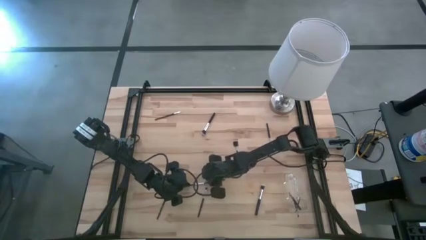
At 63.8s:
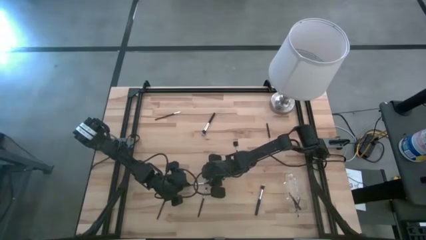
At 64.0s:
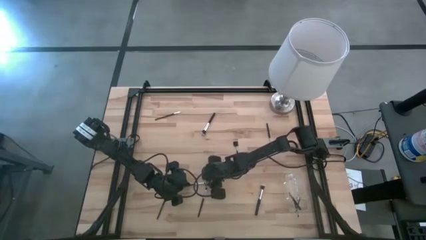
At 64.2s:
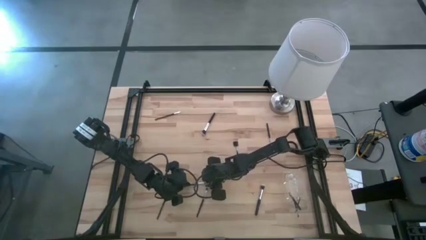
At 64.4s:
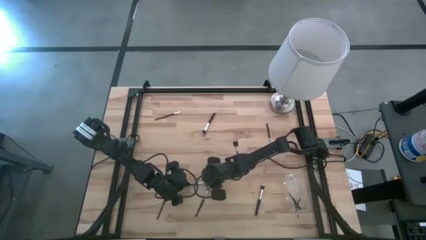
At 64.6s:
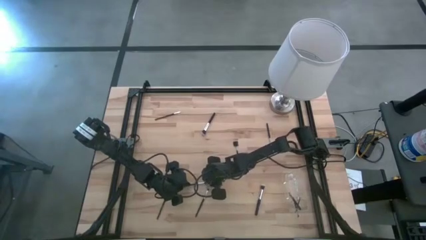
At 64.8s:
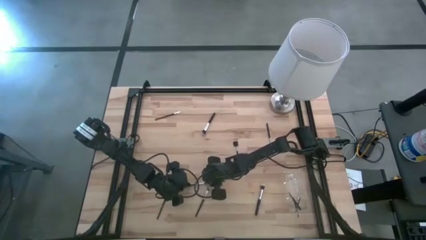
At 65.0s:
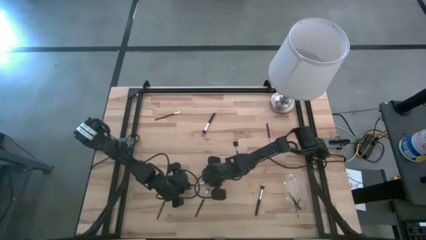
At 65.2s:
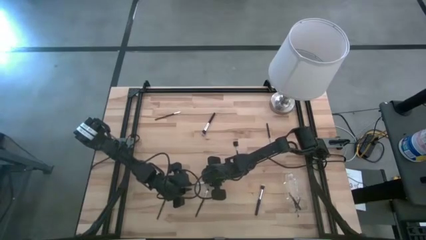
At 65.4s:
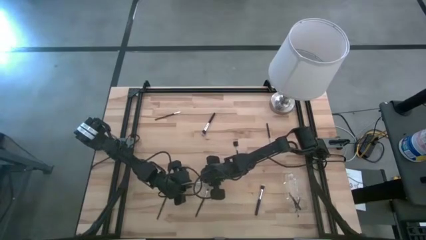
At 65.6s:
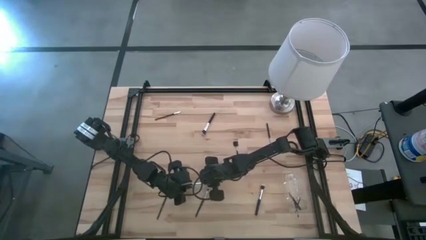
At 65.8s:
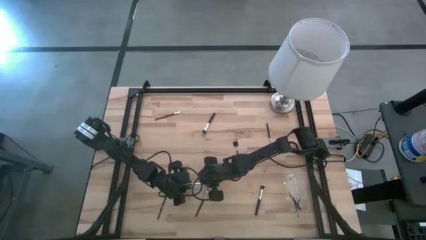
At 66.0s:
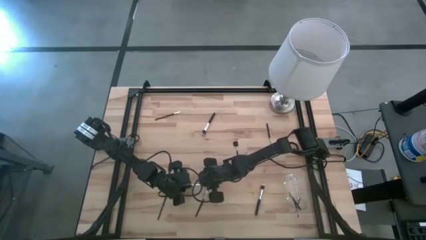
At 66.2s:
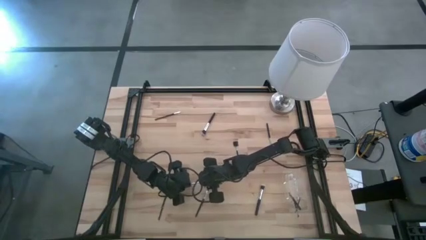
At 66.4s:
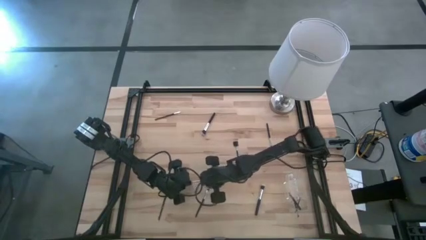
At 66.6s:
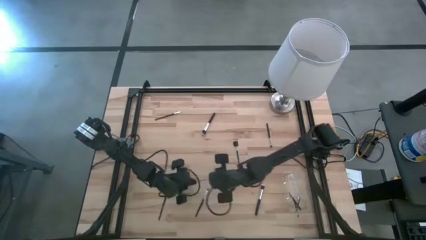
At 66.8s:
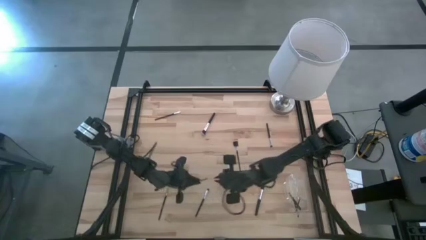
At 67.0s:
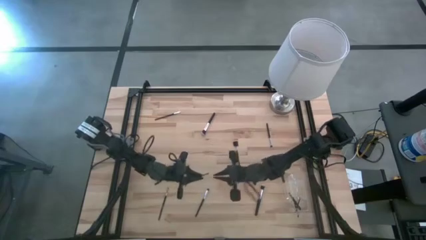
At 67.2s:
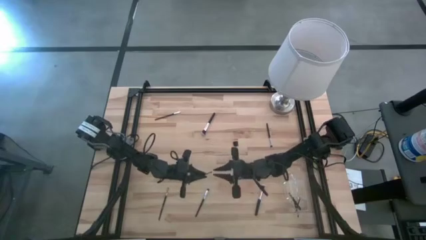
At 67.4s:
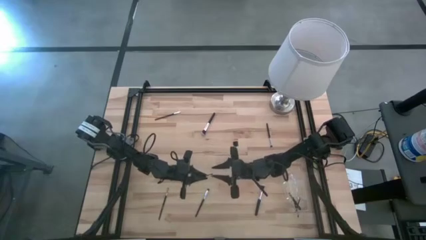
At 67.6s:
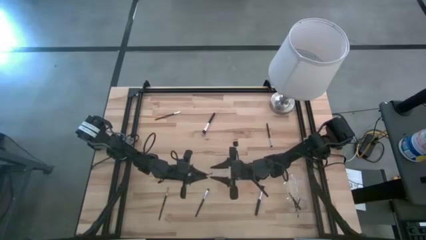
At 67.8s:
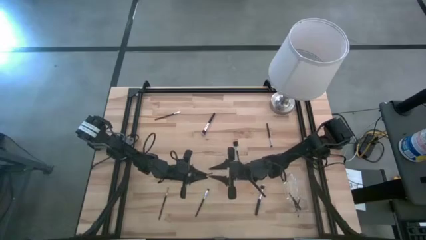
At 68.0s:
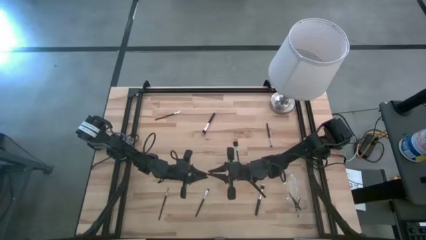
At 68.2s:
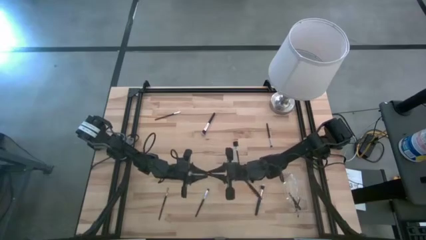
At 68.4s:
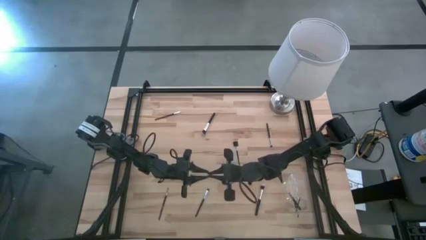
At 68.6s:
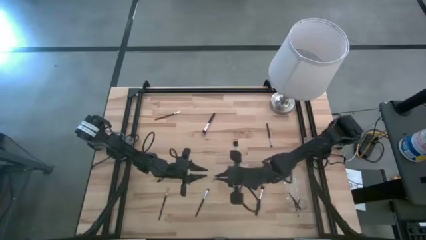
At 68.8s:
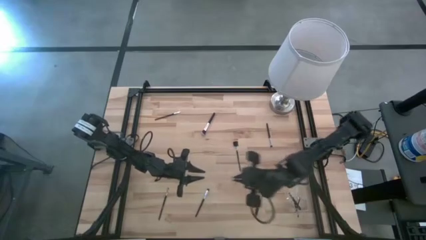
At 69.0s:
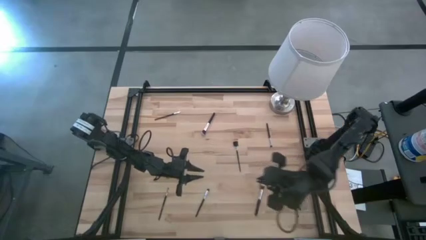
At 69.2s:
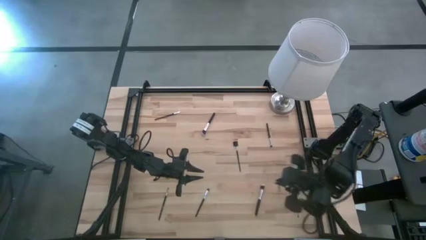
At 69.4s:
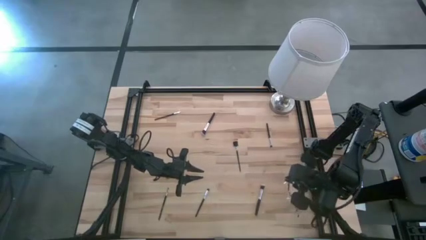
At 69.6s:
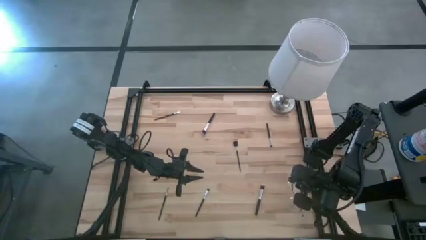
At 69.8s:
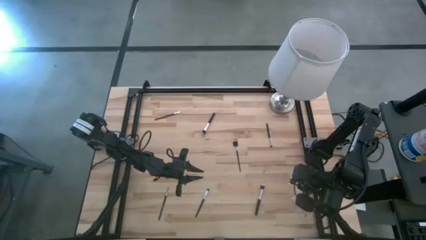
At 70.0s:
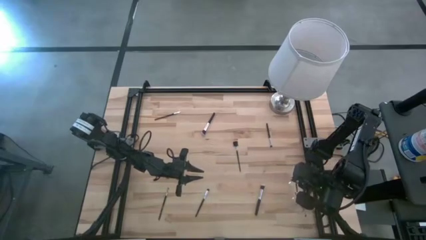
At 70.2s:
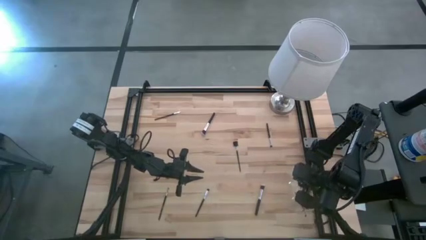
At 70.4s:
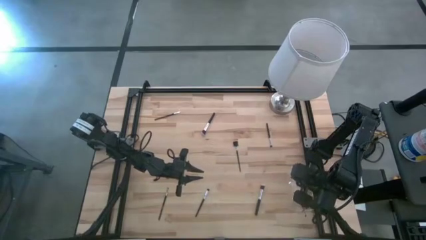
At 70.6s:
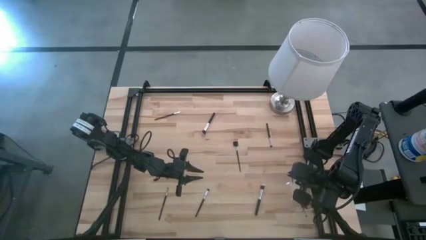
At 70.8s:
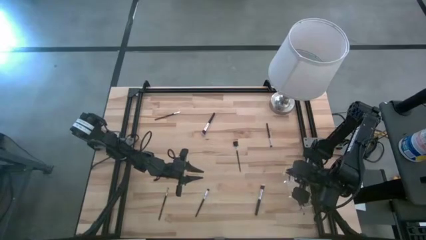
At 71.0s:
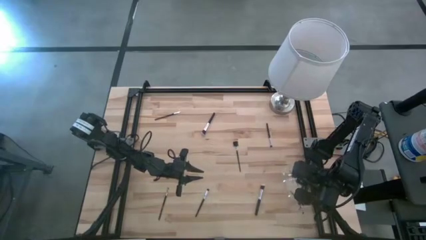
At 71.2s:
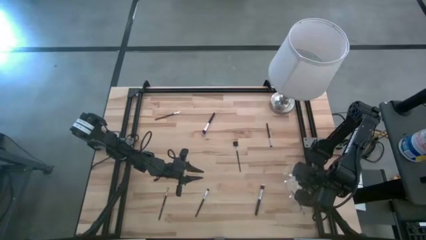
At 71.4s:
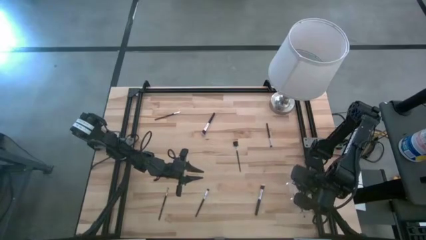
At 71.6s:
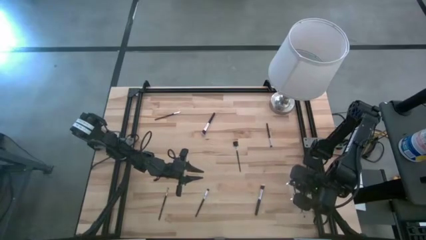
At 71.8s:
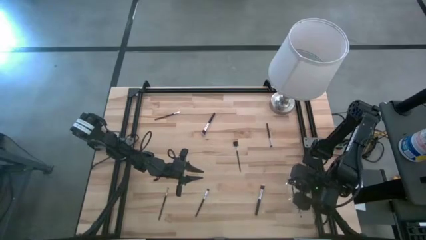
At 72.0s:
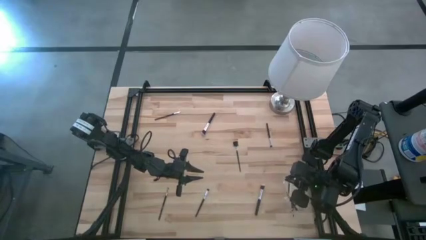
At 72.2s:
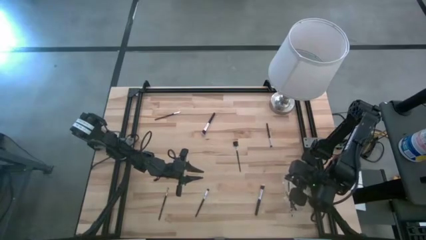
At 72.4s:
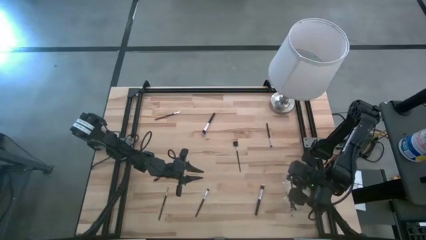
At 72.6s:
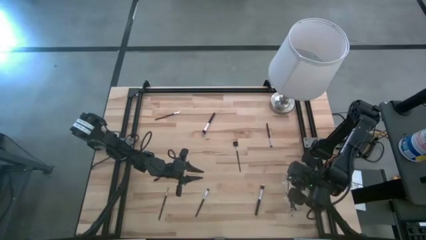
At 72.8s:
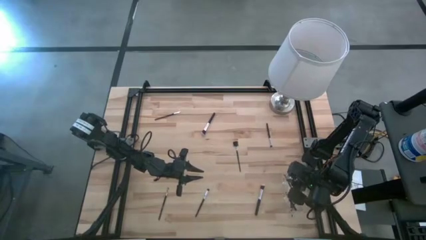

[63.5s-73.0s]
Task: Put items in baskets/containers
Put the eyeshadow brush into the transparent organizer

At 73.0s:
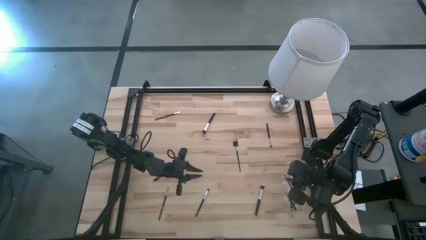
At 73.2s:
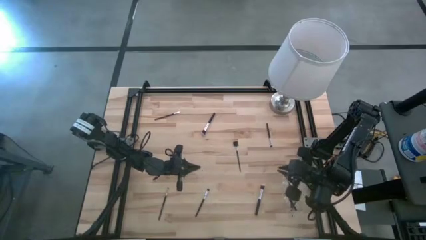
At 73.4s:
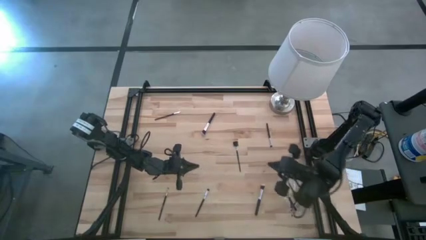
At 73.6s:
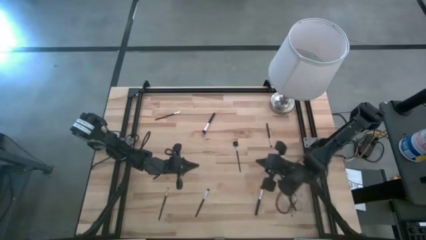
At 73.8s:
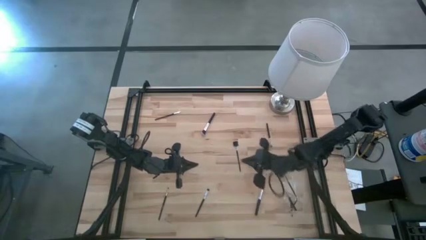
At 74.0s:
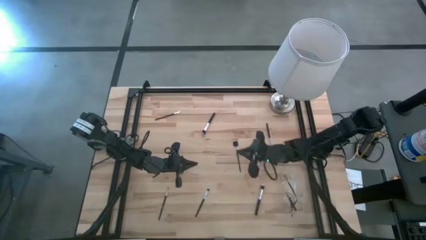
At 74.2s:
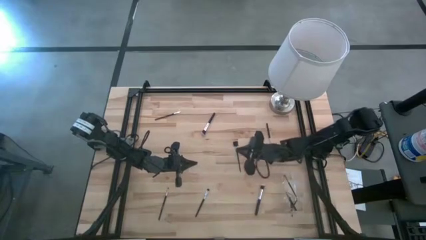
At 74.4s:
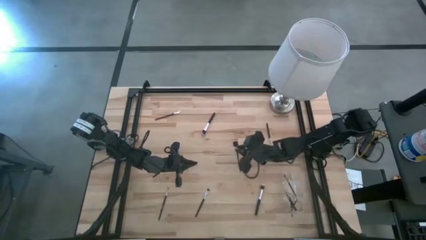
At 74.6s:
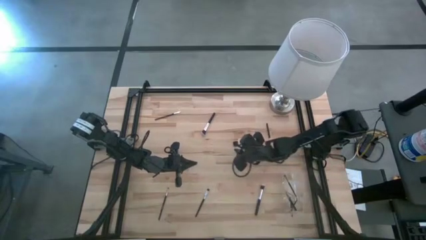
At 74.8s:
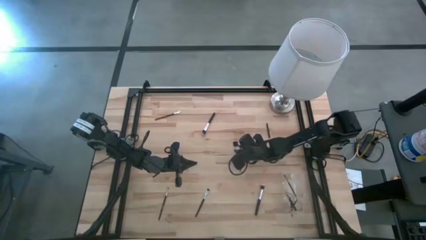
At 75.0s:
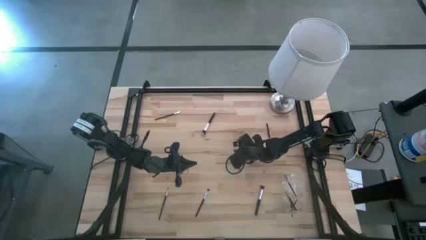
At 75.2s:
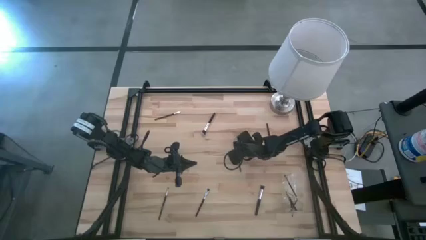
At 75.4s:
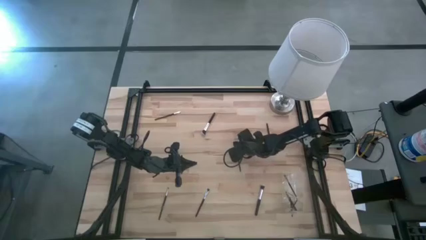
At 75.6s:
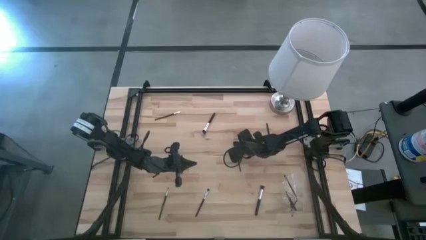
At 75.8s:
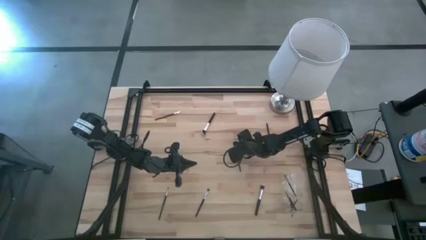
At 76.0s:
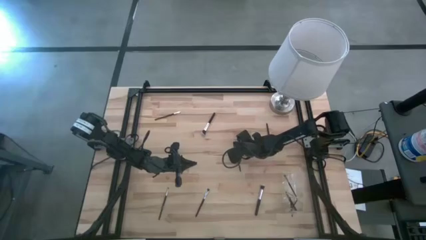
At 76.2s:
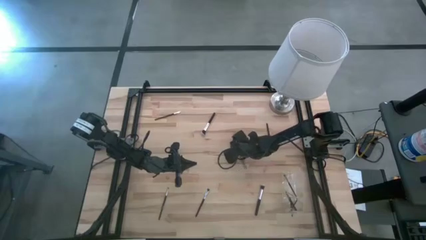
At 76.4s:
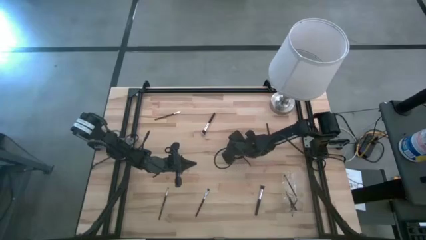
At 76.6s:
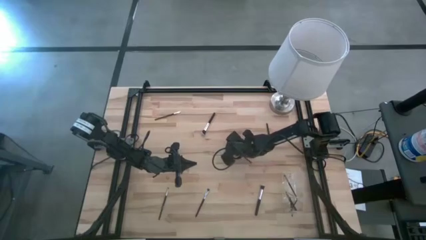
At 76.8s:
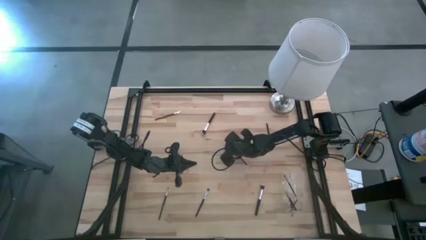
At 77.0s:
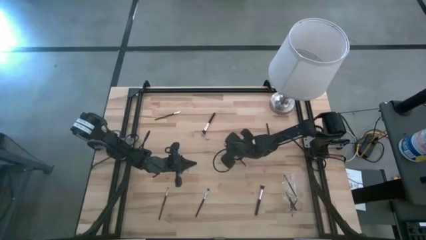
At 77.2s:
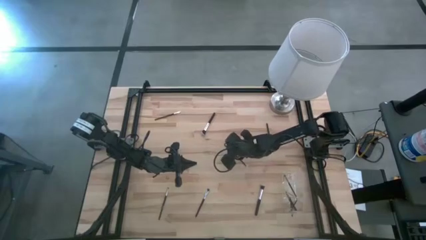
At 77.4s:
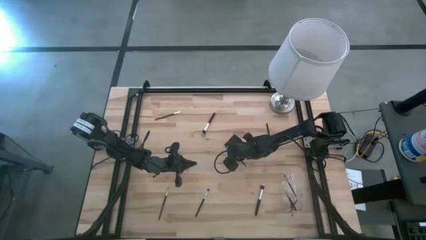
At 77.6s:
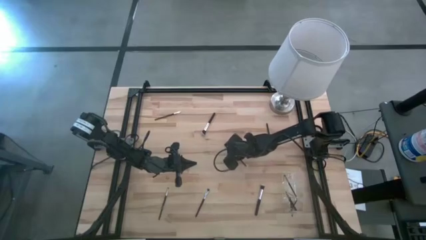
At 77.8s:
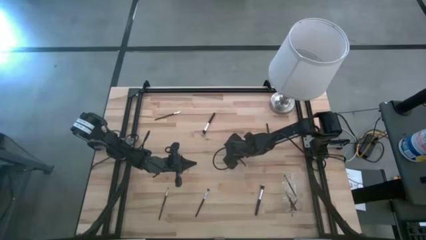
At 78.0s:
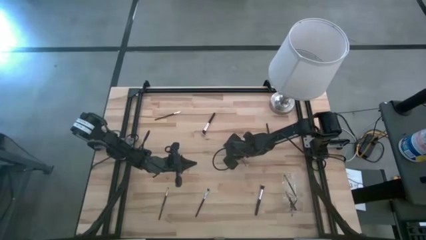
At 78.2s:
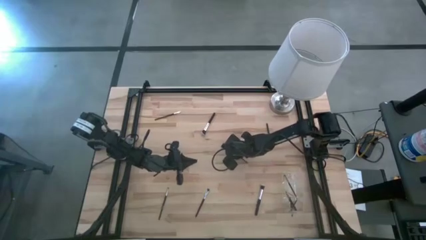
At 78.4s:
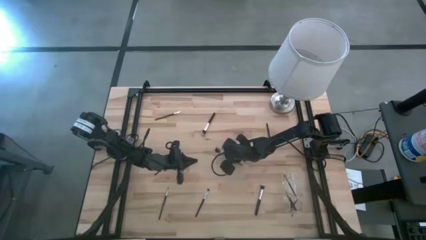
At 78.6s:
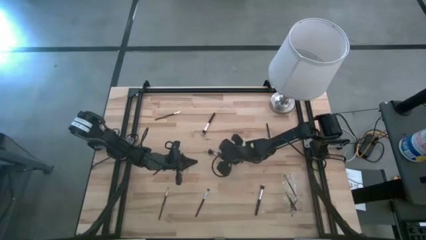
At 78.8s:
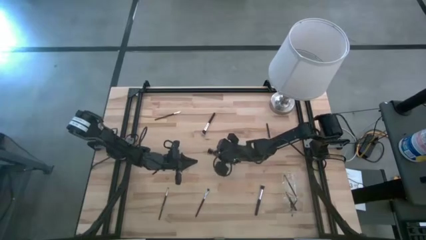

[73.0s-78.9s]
Put the eye groomer brush into the transparent organizer
